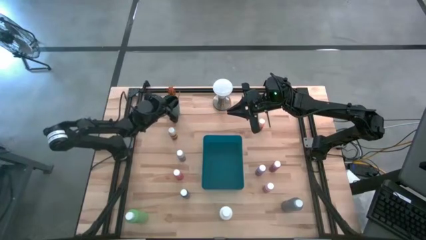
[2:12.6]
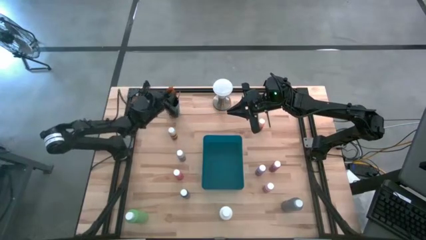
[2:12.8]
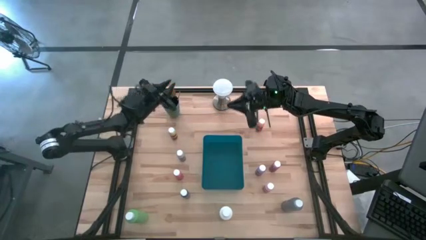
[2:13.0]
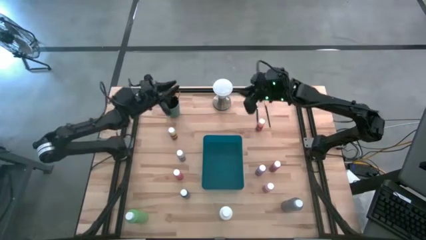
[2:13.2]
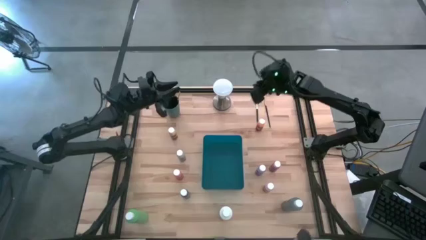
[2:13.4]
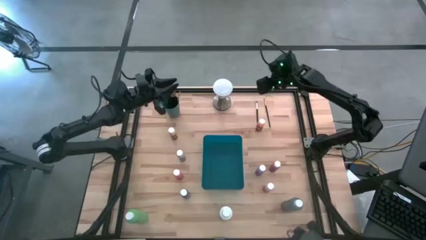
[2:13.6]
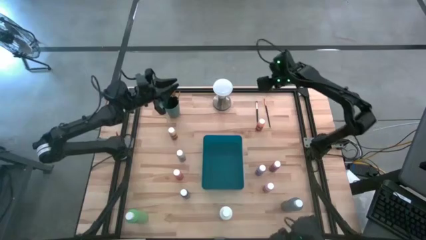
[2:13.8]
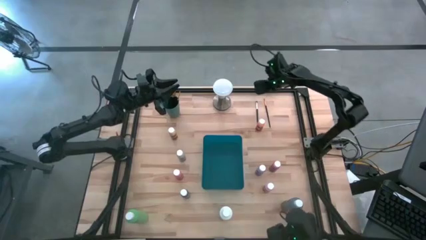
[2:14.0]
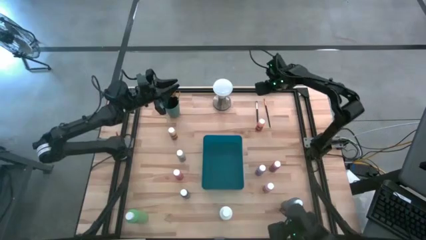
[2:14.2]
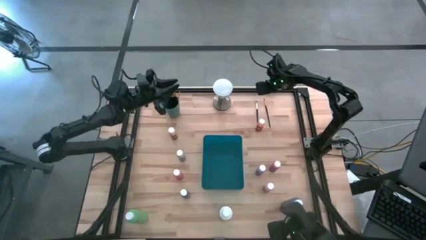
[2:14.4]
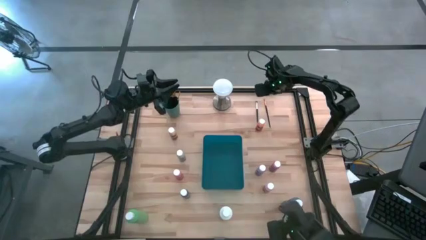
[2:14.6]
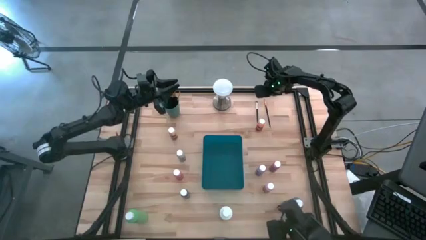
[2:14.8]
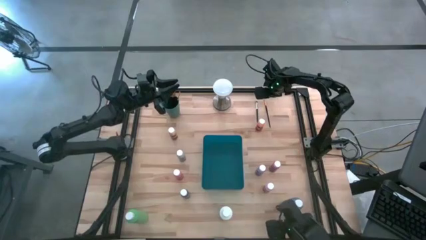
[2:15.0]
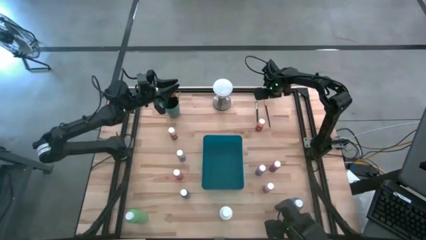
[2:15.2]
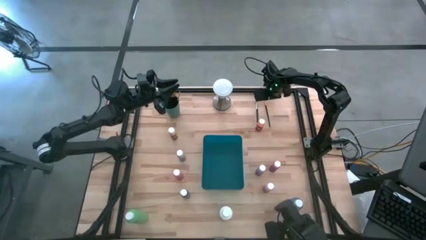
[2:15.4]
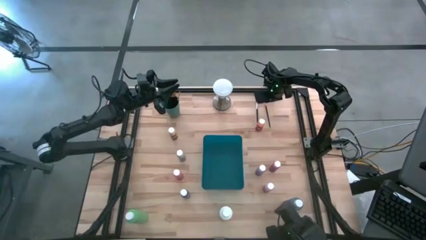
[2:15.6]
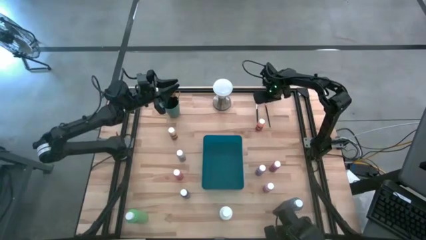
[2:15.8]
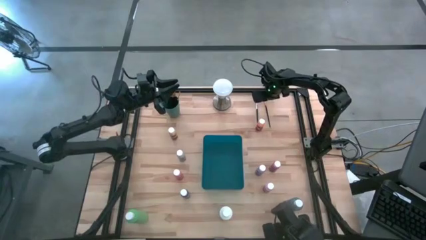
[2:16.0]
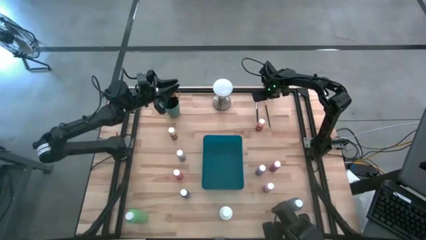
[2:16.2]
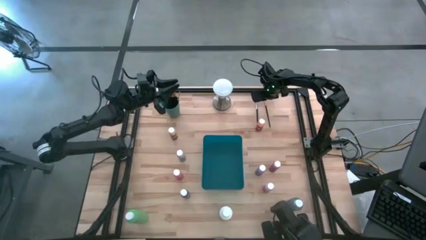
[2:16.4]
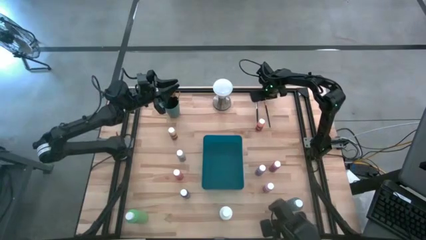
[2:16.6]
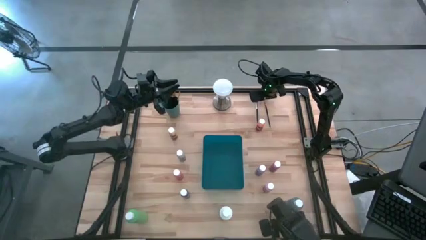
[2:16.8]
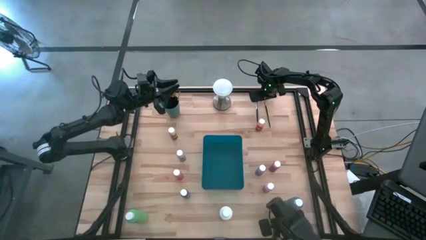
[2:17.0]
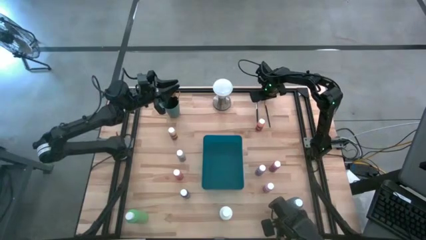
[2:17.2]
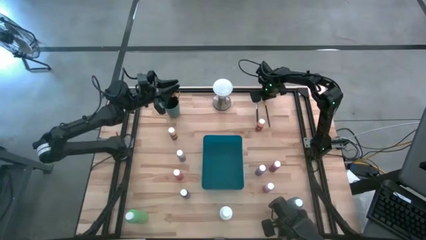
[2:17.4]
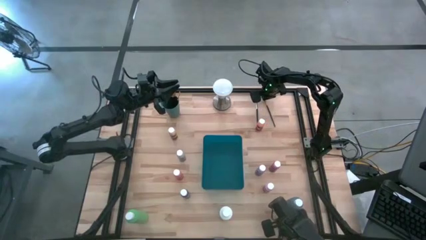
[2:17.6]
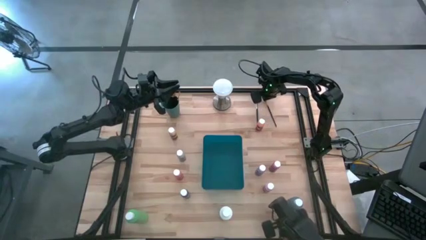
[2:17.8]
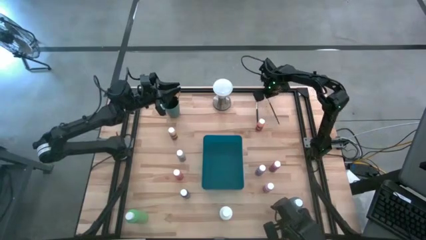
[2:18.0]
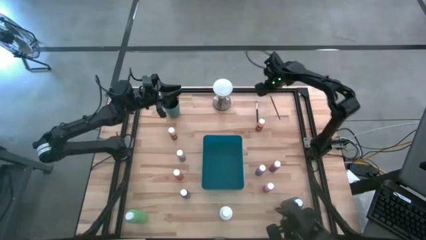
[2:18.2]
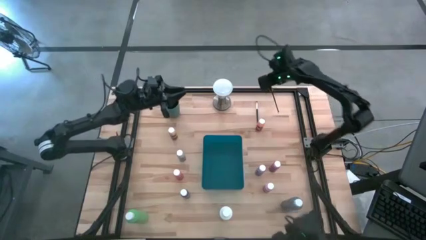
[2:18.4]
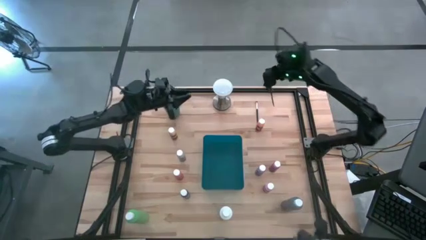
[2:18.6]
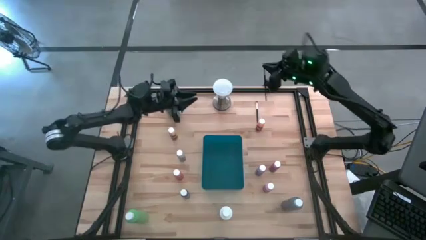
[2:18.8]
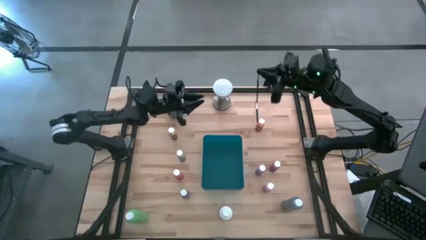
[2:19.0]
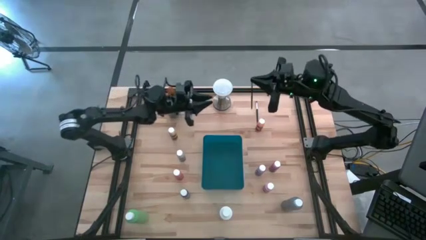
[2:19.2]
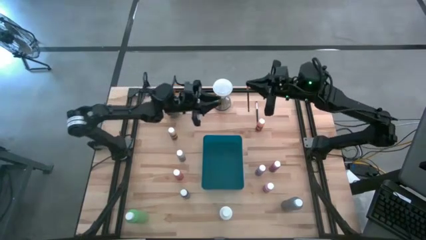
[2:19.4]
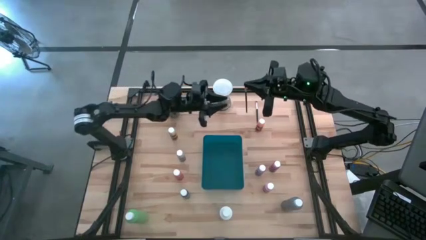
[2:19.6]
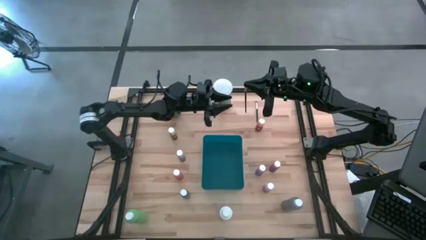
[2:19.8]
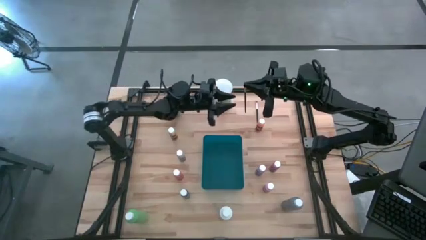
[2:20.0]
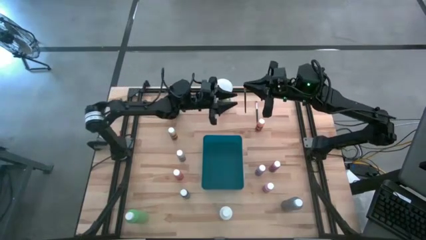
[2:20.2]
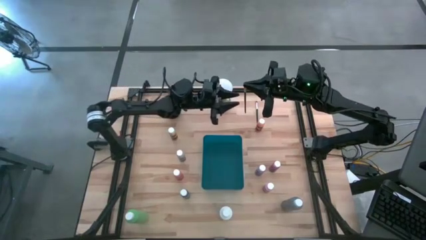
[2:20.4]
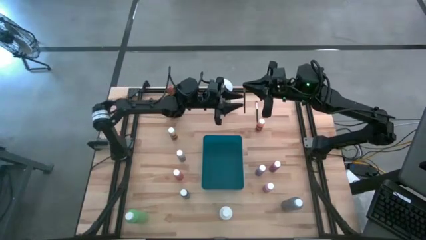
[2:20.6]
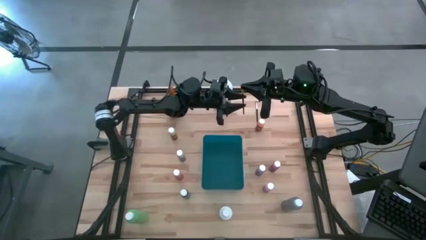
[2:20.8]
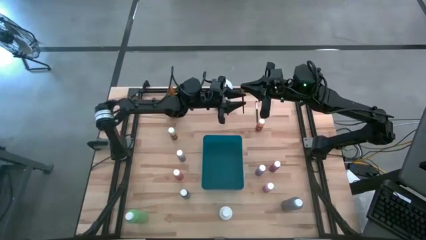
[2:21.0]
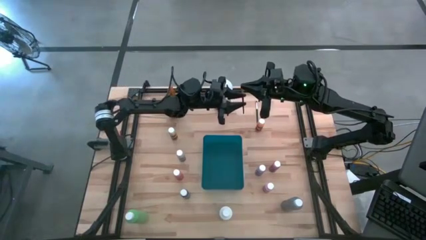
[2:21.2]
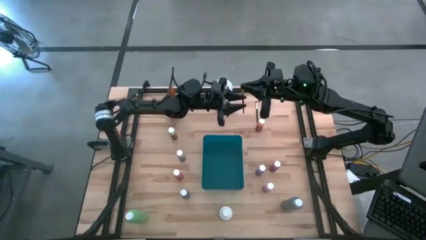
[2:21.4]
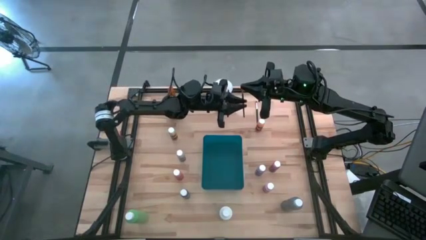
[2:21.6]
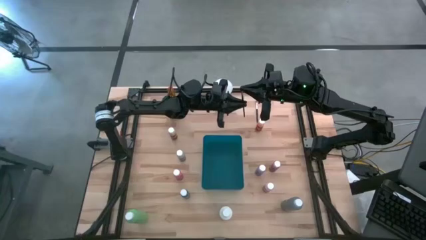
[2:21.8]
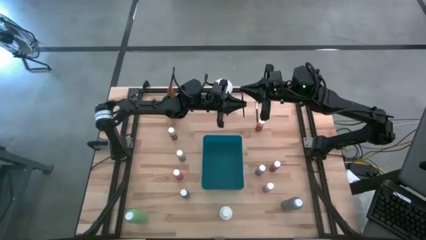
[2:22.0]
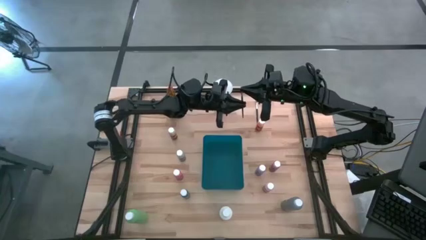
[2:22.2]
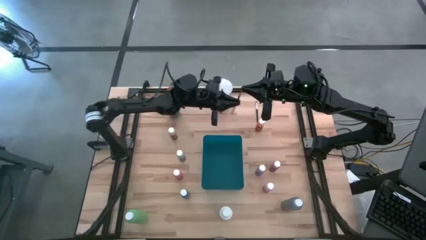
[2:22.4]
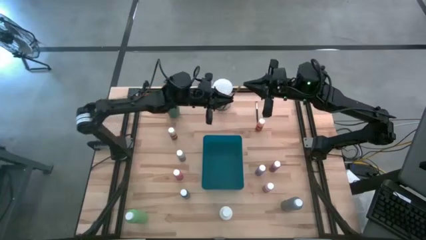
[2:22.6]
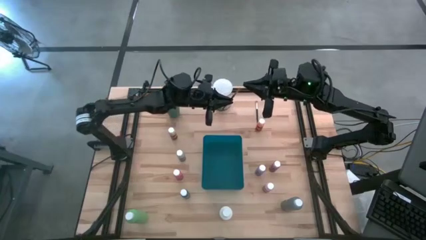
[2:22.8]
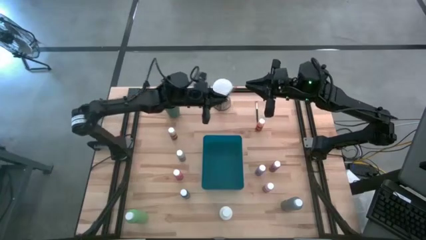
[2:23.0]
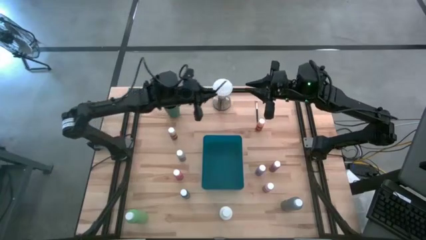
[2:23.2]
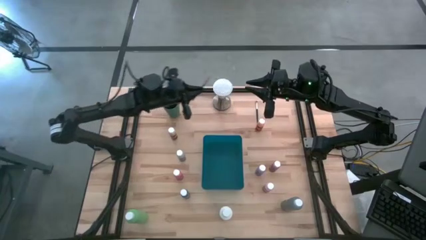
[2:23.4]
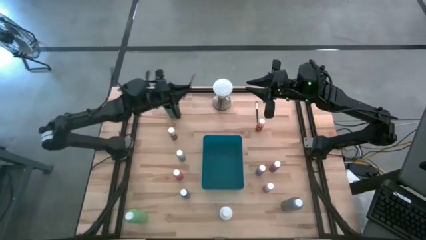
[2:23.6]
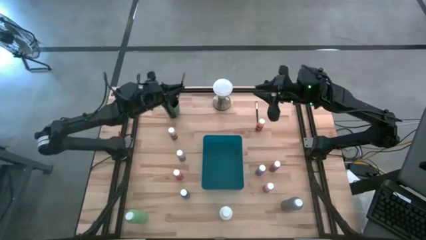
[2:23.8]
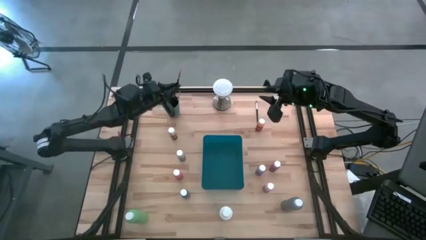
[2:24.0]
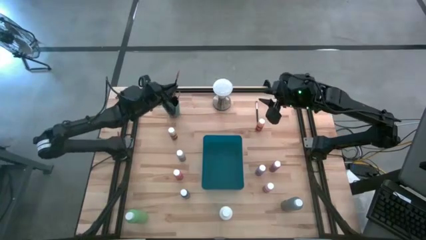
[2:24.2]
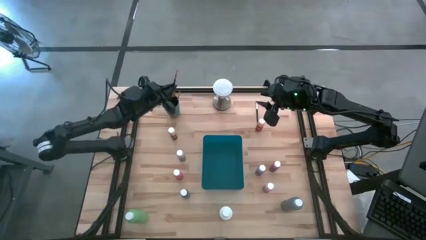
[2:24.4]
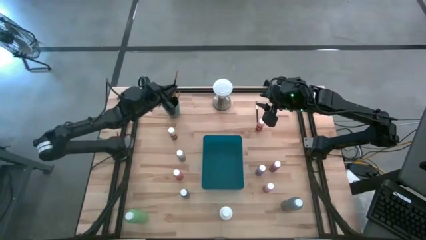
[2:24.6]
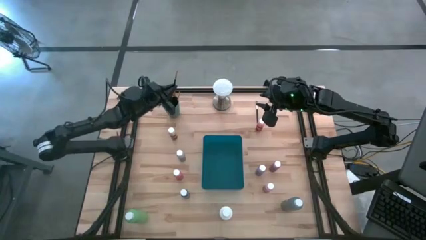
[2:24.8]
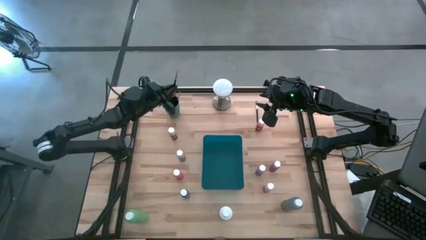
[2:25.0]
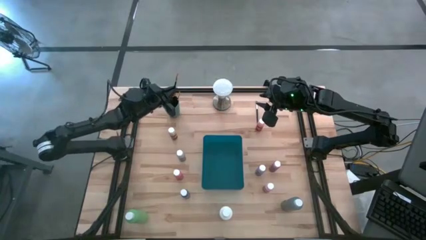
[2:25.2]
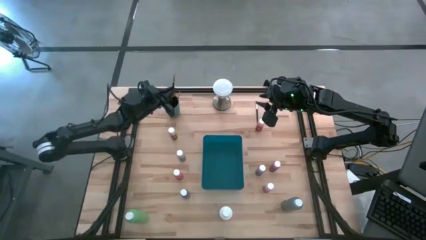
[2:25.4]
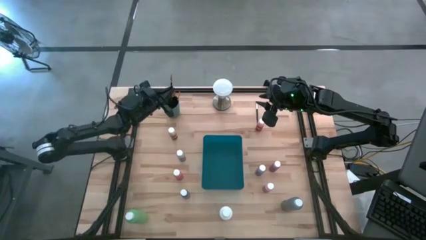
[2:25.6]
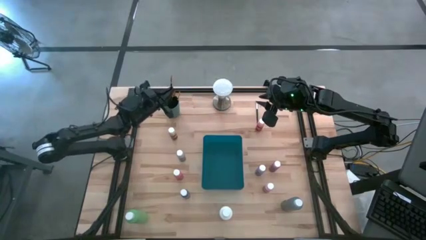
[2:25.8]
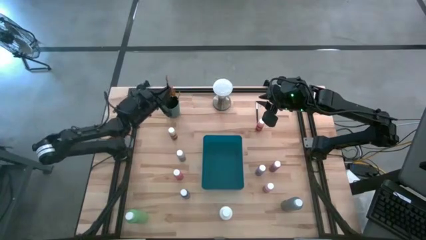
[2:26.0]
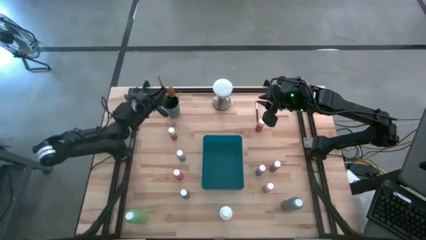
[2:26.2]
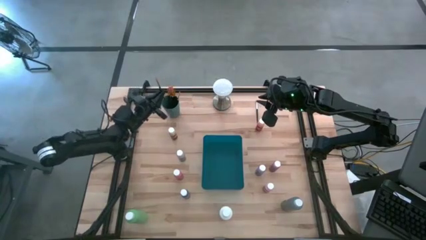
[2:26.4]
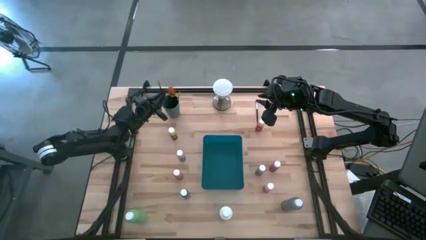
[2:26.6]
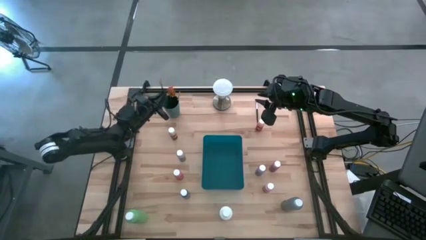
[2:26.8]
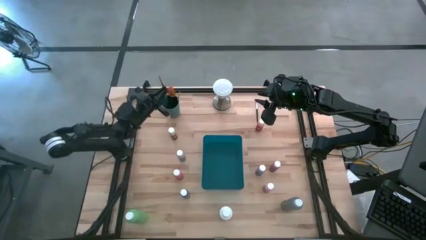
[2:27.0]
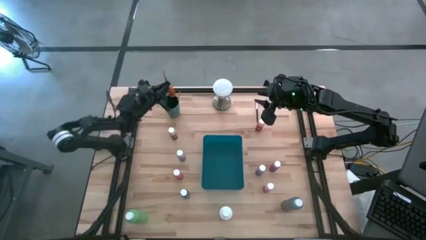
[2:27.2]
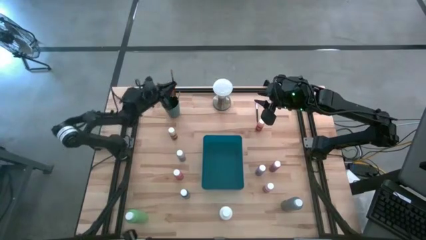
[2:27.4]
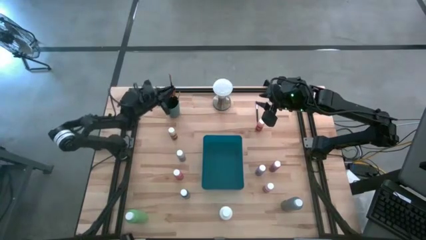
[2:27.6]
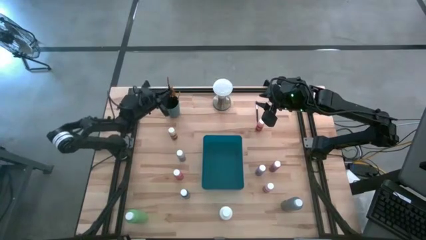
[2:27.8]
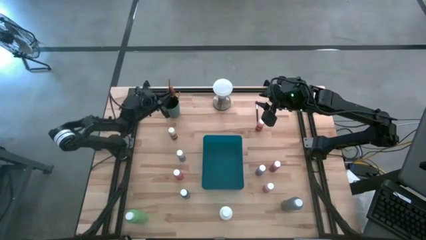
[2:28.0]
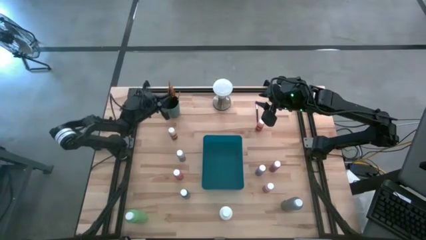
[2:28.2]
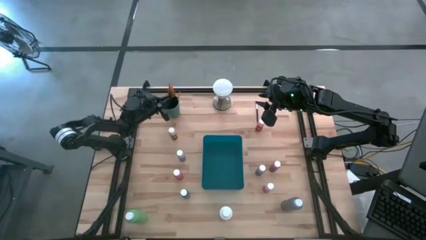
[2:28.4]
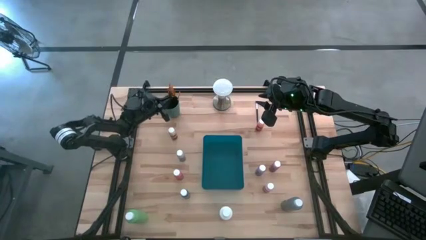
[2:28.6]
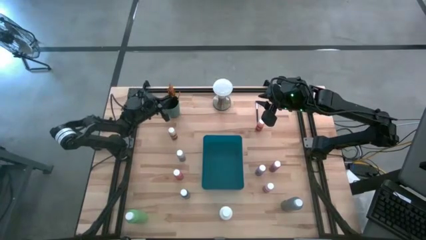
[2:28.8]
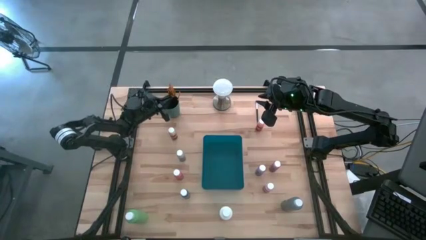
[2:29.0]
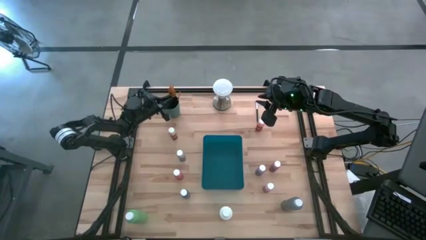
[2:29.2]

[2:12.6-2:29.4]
Task: Pick & Place Paint Supplies
Put the yellow paint brush into the green cup
